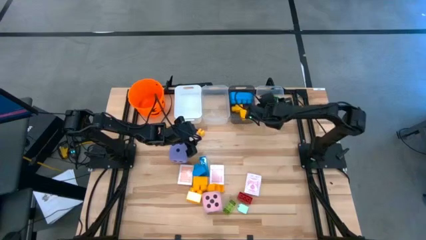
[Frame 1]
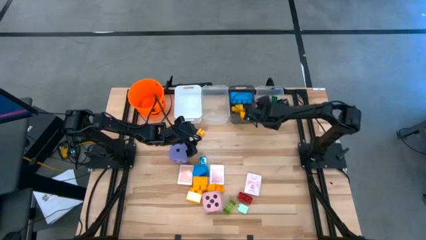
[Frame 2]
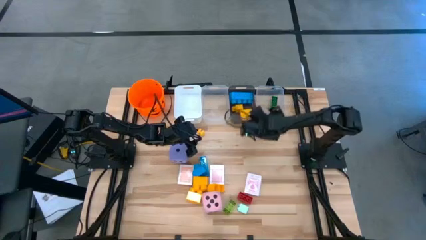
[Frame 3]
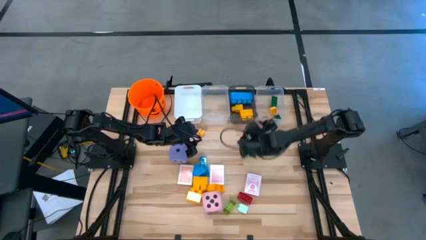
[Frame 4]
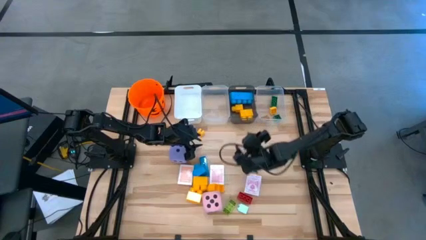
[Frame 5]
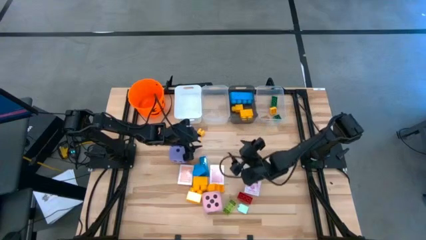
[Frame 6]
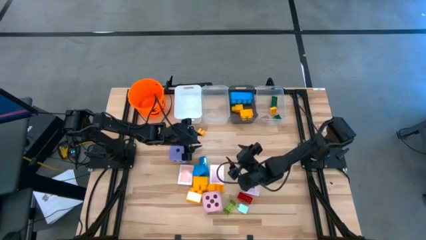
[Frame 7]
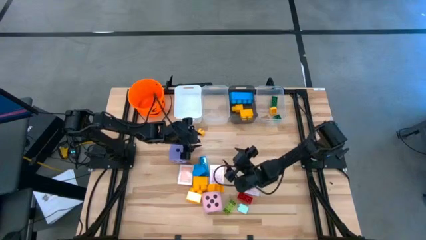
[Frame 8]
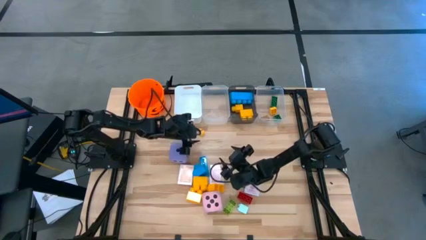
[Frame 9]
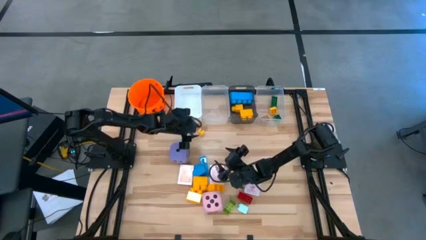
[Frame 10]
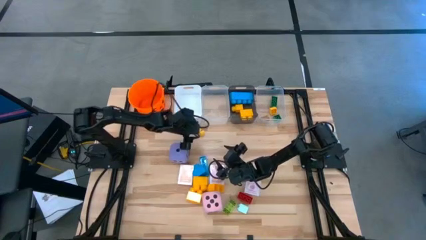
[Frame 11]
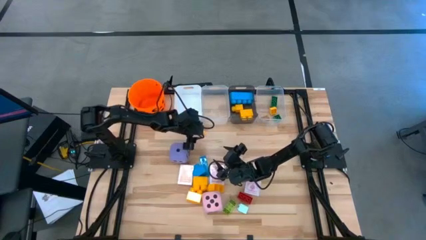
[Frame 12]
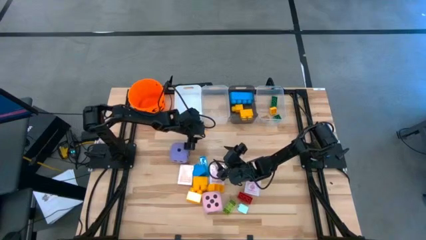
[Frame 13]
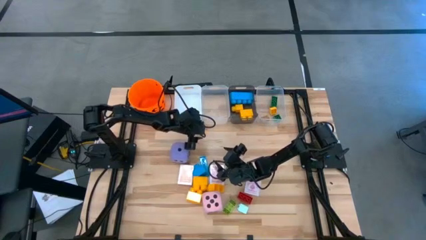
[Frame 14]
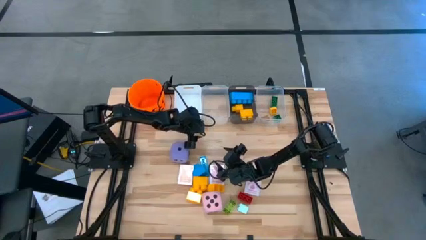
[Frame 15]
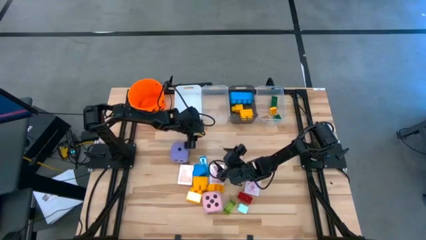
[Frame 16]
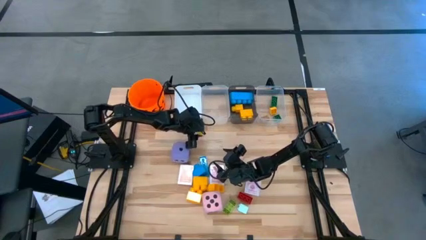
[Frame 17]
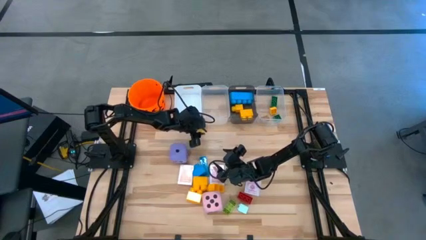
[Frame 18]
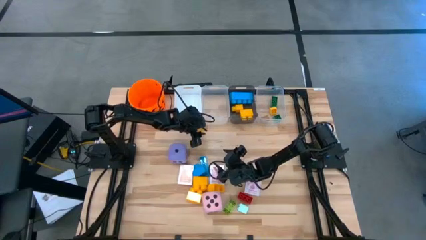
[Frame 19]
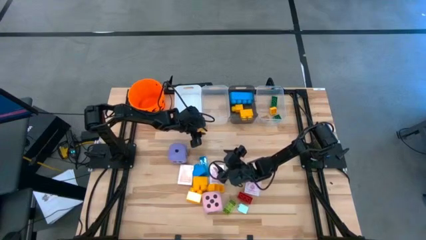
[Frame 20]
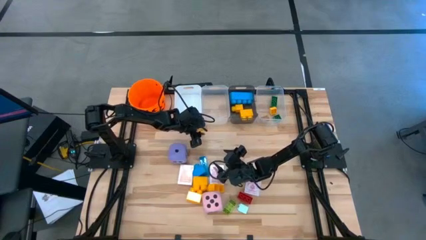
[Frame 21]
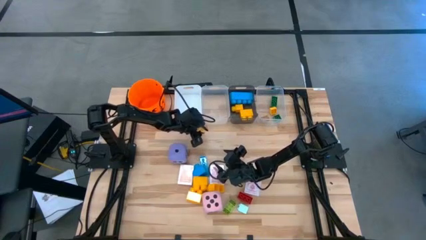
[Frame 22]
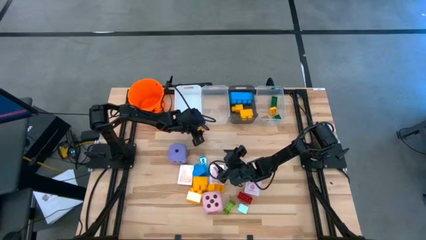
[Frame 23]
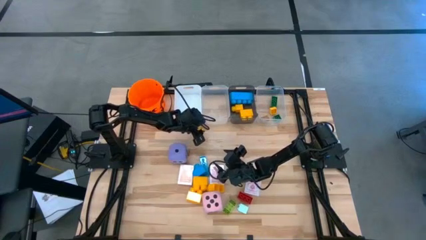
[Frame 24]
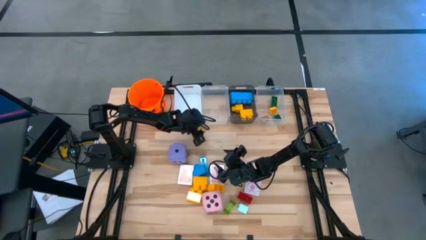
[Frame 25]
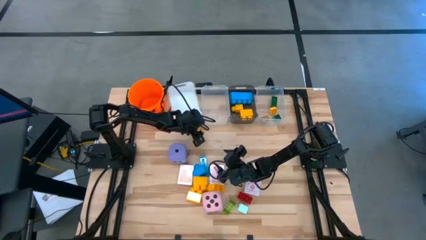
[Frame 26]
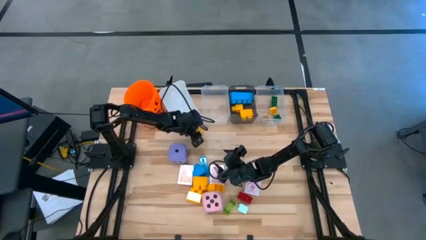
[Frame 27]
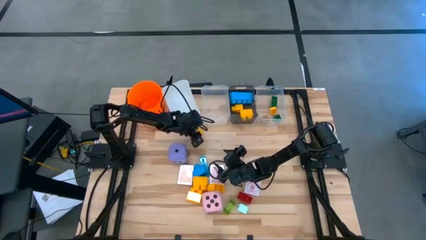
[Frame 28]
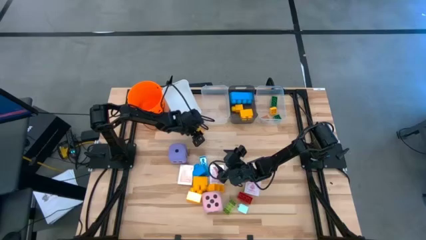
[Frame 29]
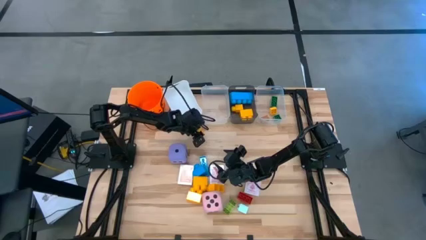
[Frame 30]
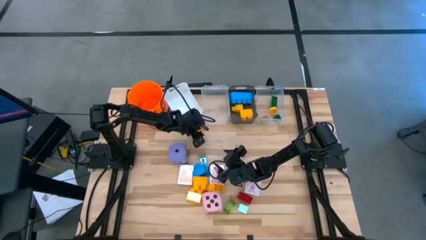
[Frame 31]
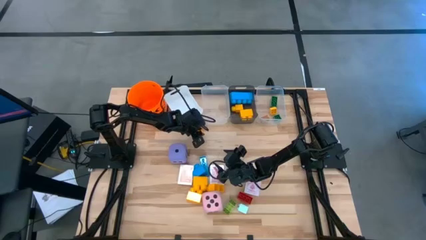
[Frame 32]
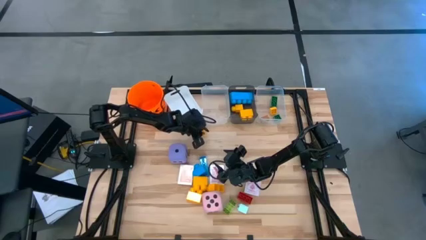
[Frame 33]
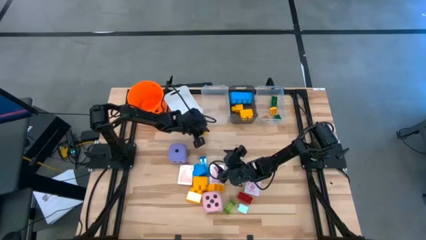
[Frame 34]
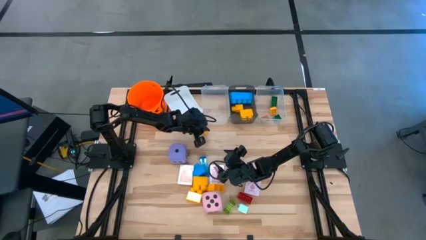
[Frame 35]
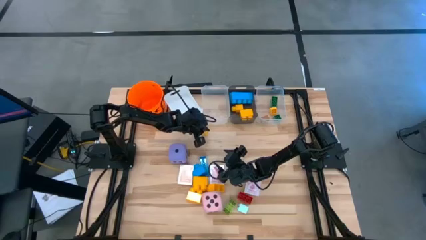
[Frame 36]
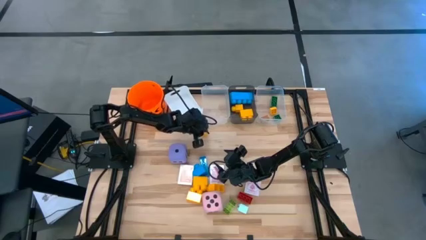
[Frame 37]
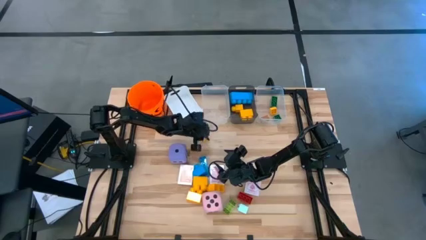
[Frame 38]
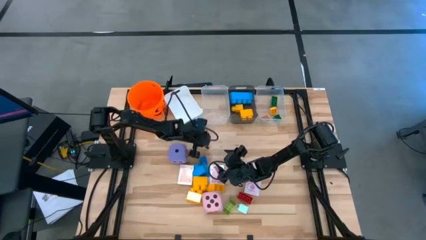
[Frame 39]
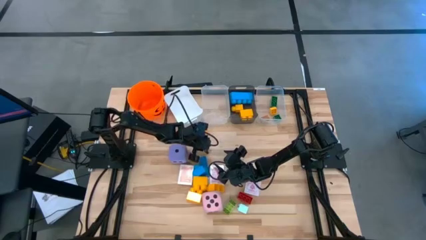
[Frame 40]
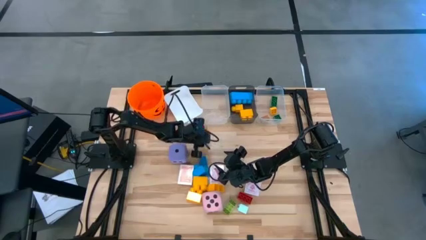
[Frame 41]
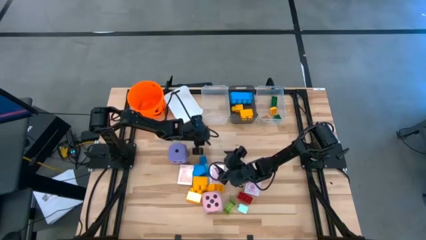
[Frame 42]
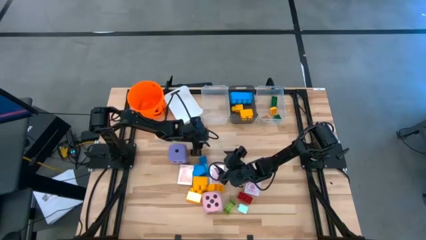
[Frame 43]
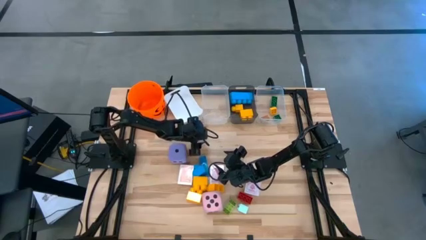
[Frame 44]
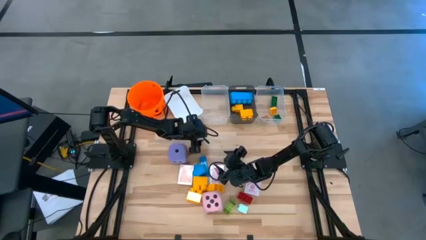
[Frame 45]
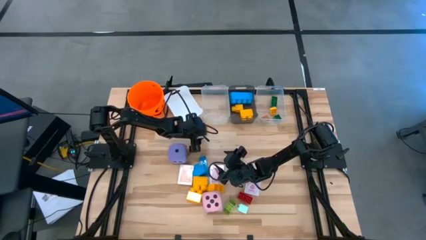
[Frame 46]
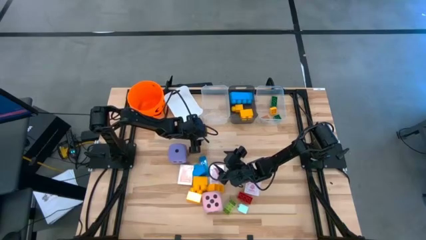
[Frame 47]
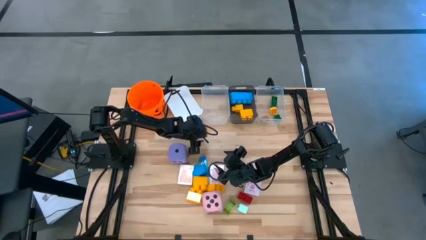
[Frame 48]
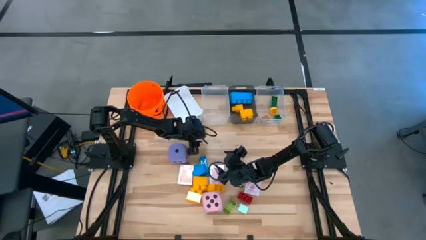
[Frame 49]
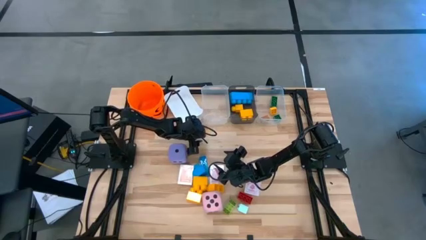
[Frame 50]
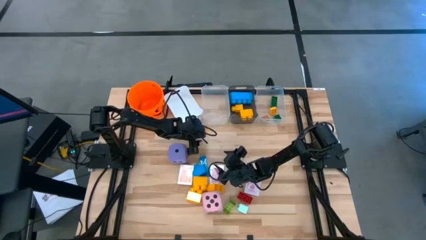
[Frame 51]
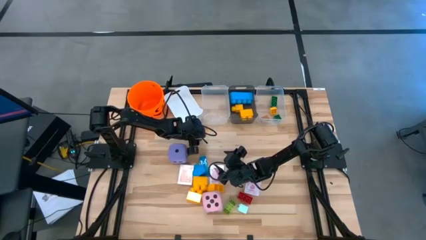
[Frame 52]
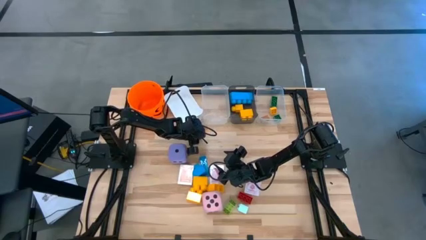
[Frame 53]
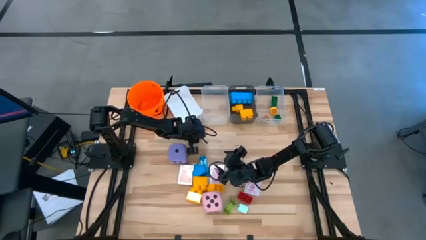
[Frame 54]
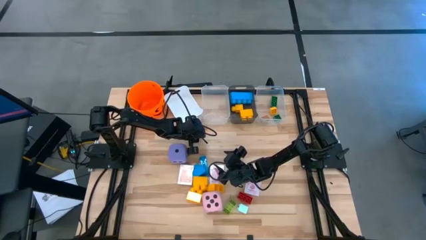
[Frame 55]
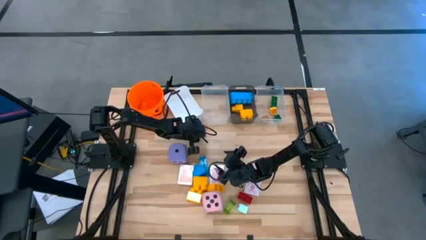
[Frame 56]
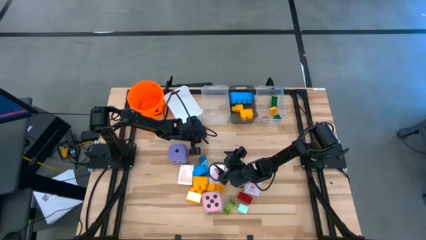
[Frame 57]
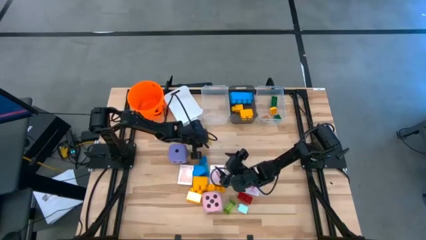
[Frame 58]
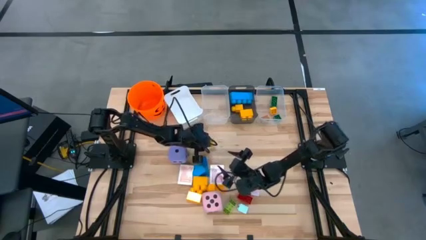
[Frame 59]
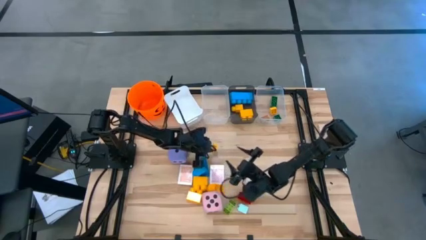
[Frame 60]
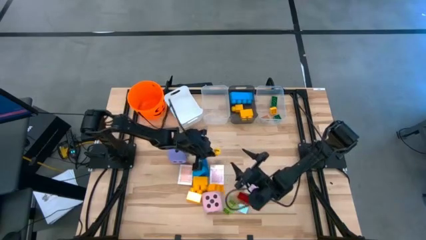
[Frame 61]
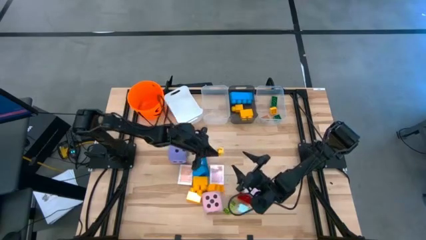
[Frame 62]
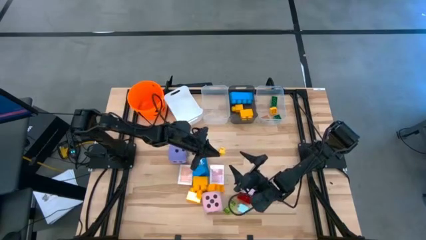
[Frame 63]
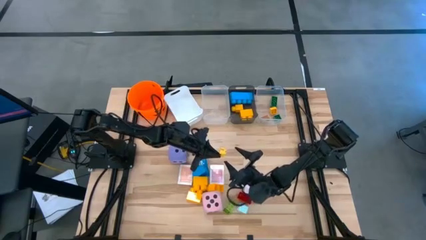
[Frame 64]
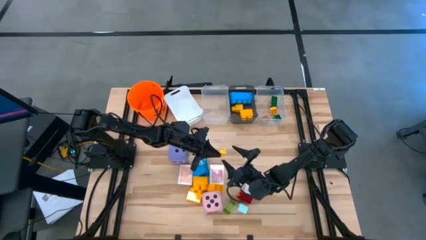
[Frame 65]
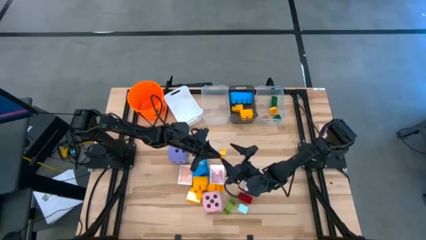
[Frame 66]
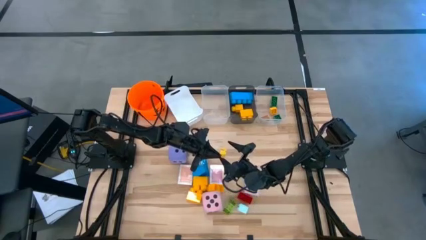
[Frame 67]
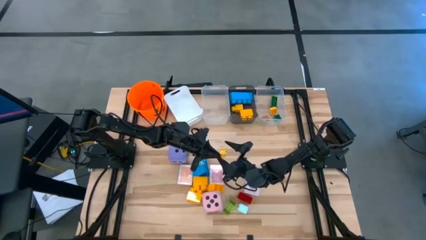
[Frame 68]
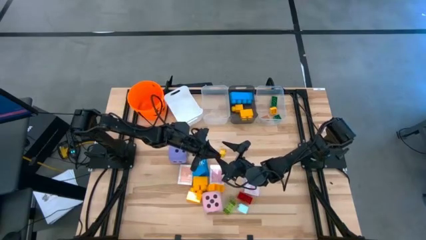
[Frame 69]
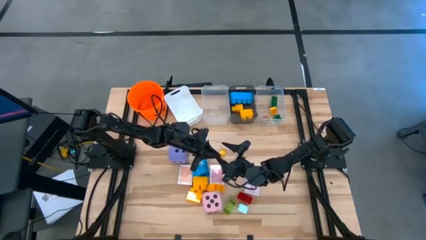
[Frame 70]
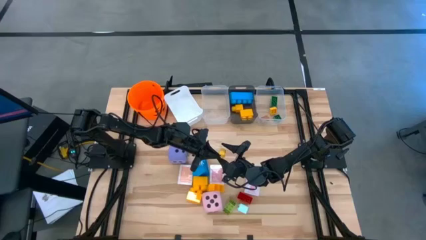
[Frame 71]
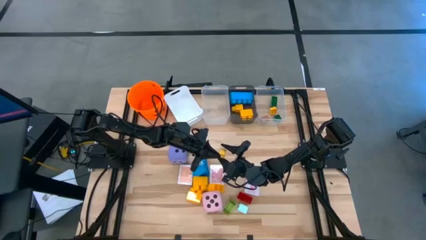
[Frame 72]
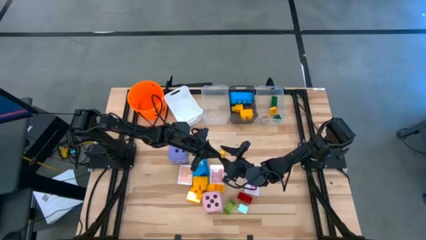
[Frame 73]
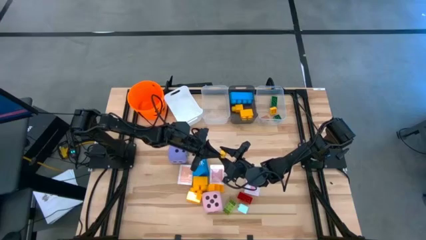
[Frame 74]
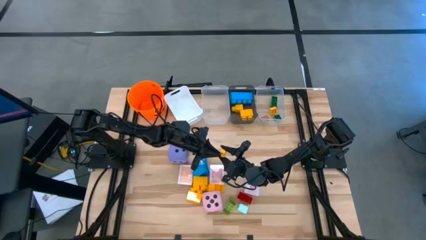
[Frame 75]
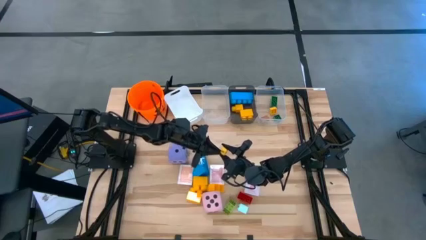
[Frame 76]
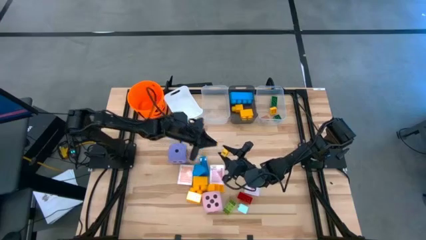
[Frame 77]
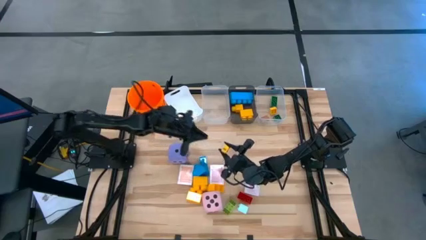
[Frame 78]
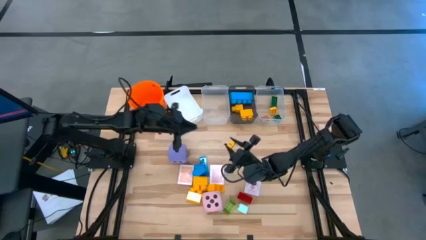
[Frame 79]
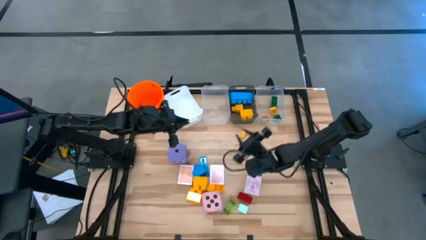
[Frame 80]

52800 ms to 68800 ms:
Task: Pick & Place Toys
Put the small yellow game piece into the right transparent bin
